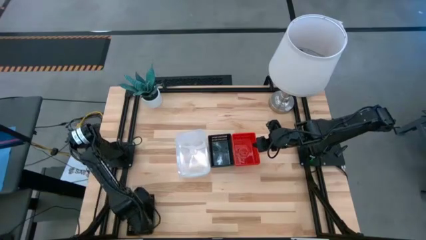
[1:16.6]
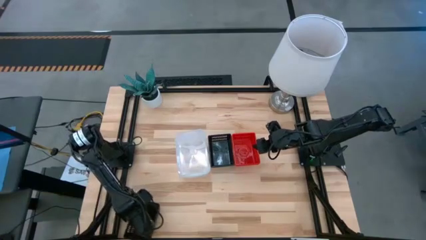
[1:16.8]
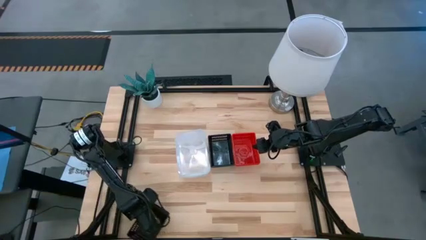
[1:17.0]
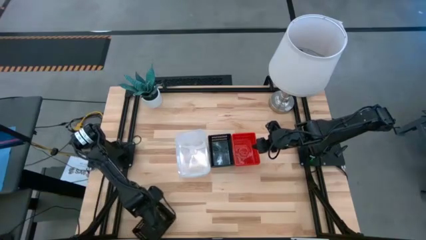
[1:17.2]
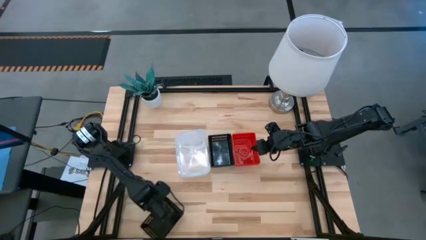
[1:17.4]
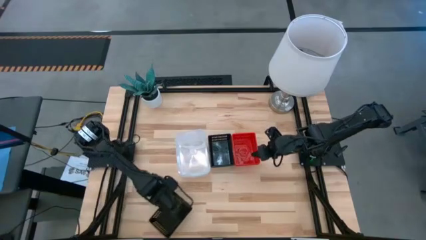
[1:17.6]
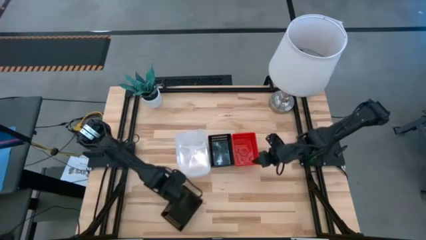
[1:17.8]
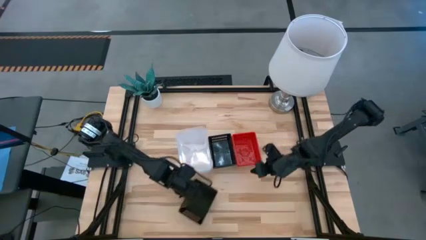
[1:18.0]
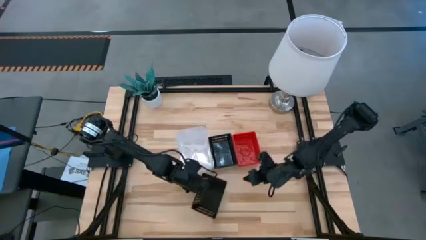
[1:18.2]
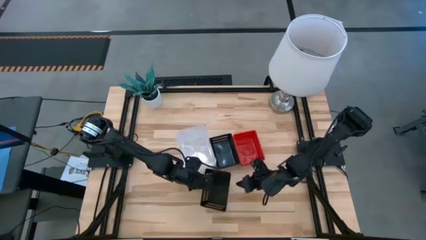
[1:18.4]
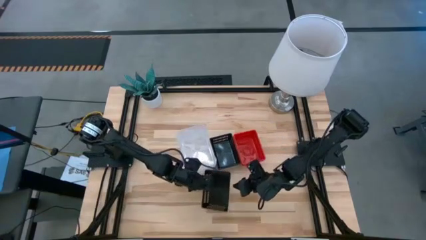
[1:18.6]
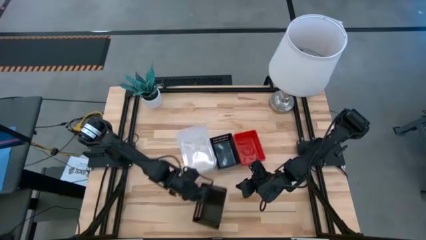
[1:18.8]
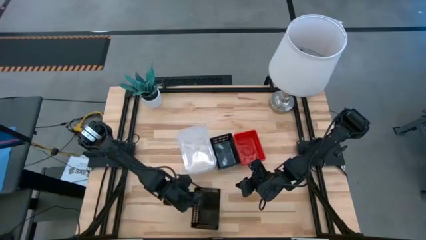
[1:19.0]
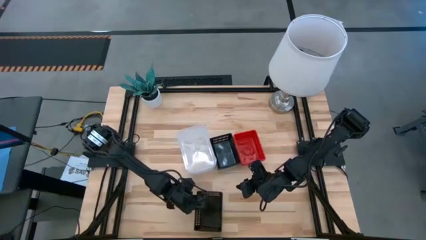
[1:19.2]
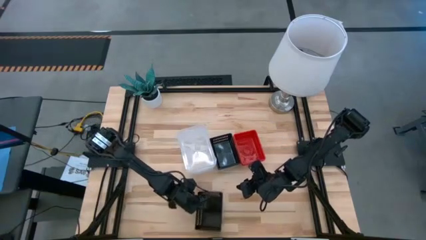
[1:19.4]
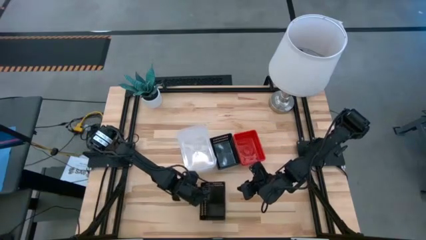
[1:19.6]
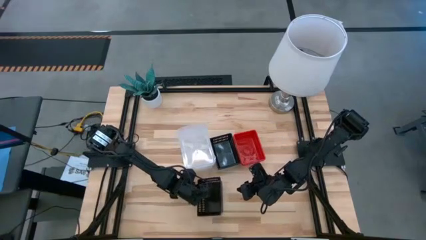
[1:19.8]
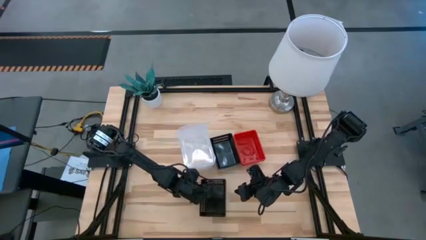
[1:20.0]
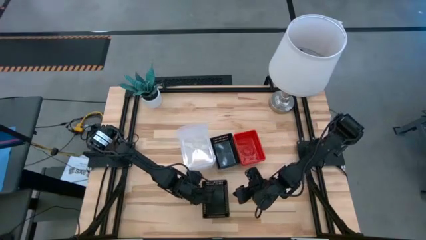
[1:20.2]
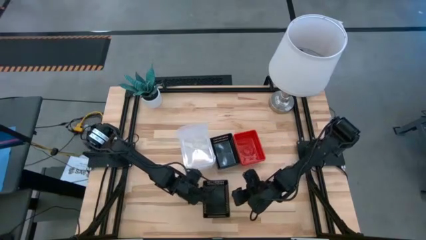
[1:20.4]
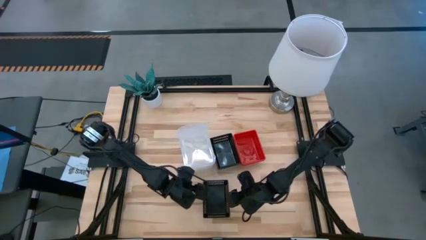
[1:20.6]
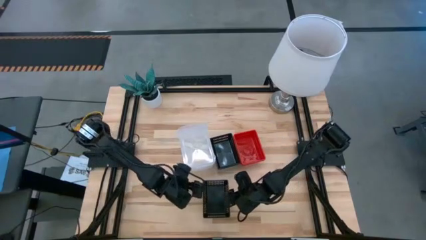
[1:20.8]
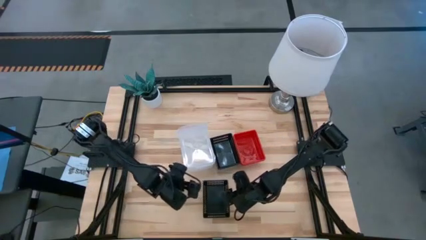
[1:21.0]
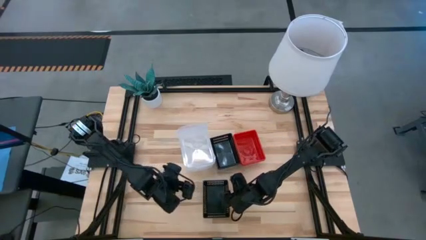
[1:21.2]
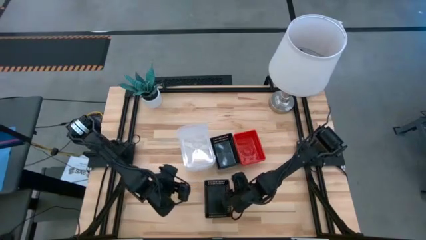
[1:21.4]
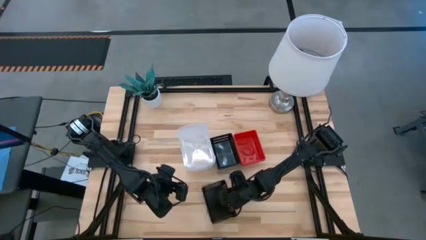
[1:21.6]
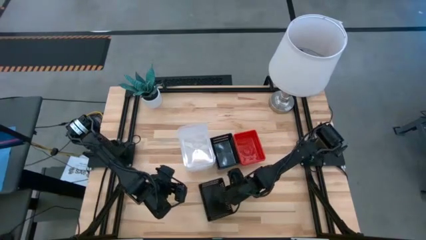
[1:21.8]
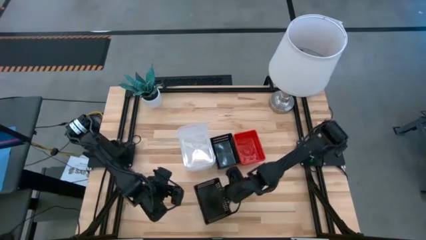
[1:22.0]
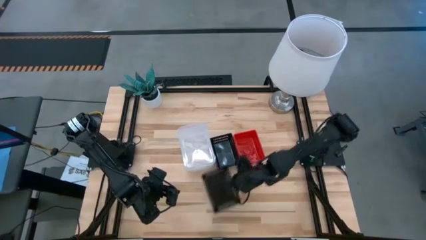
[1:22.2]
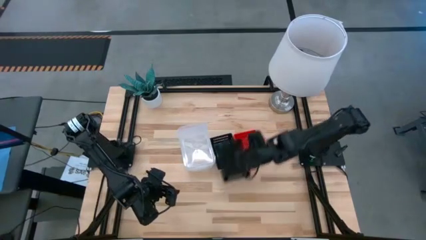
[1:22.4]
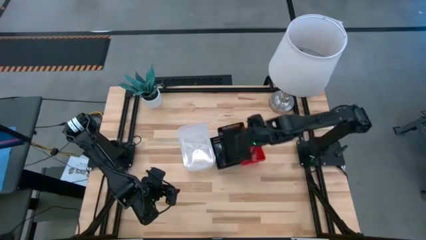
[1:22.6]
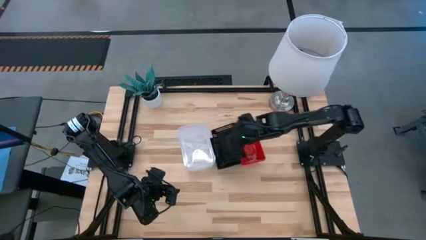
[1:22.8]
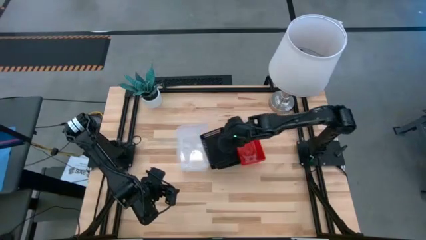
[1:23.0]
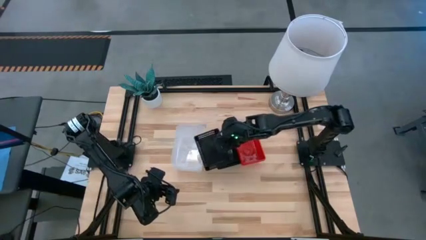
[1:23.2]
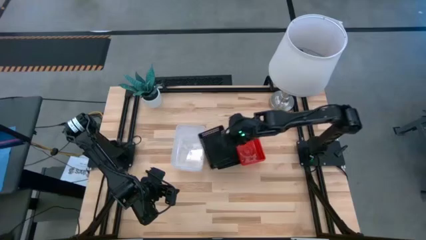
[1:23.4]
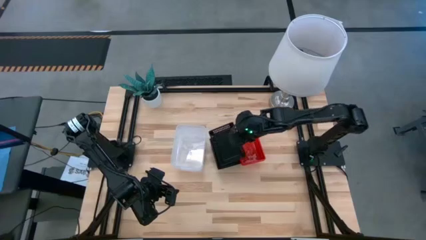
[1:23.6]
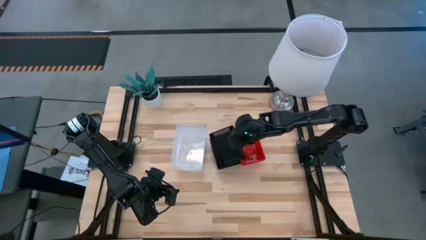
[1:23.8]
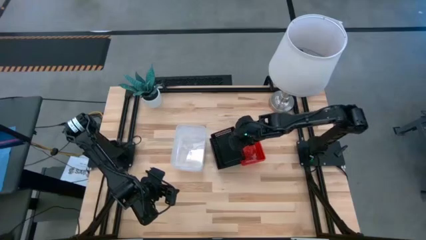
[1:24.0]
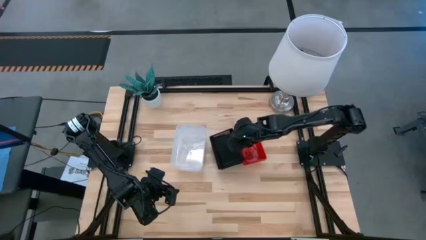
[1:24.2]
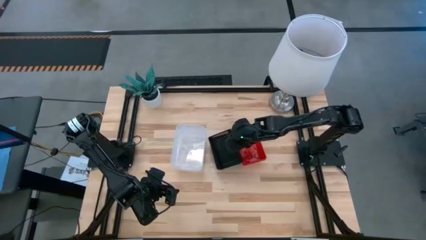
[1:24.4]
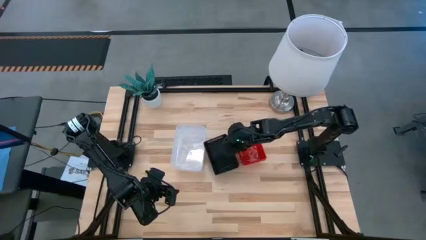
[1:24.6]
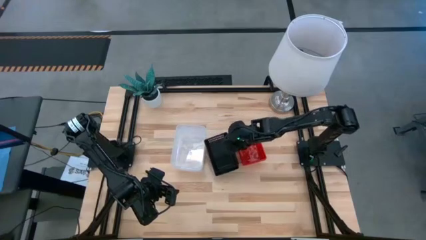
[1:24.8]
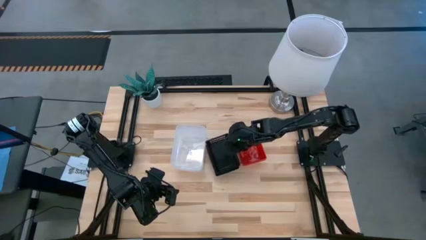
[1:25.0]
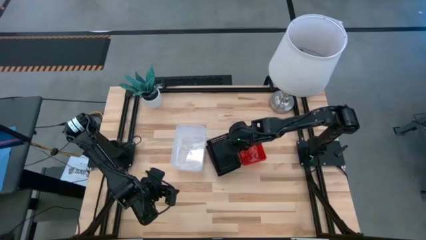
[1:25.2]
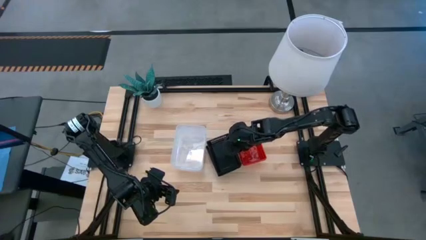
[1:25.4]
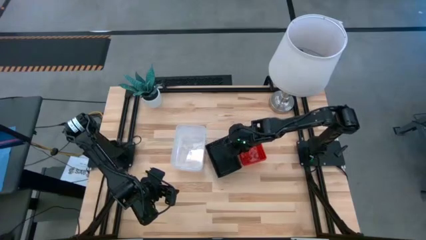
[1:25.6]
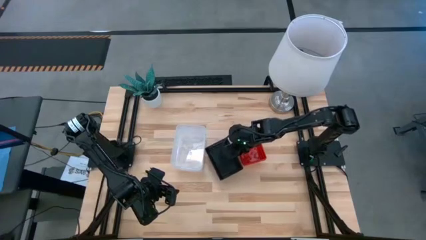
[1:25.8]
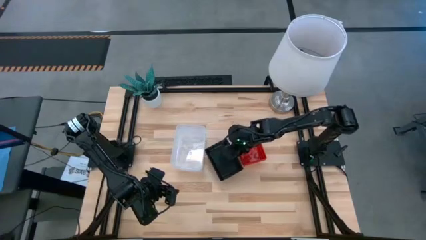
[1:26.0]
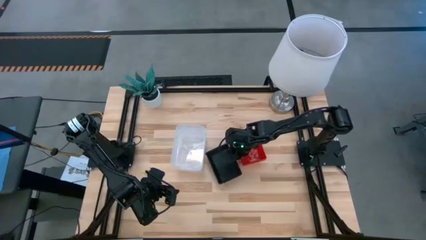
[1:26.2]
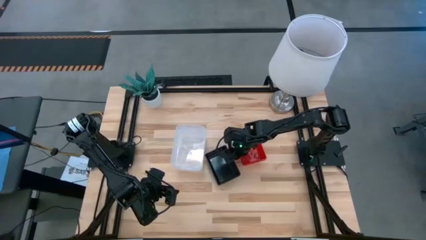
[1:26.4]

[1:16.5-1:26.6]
Stack the bottom black bin on the top black bin

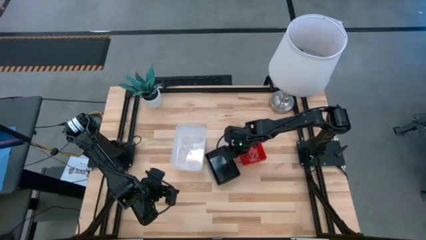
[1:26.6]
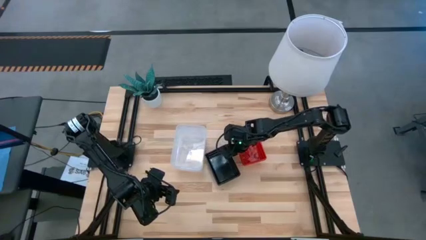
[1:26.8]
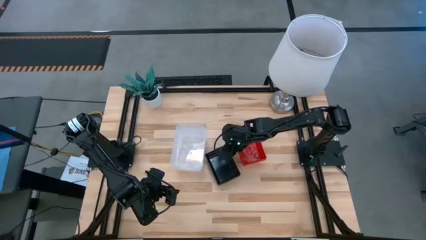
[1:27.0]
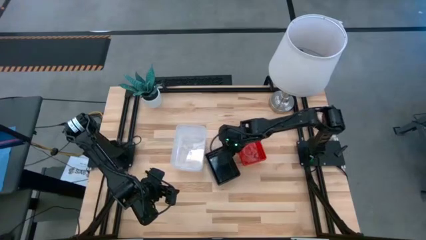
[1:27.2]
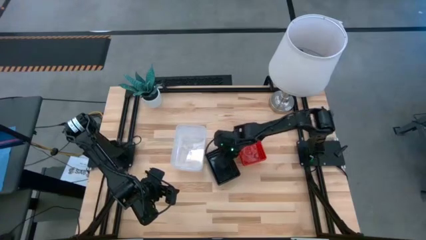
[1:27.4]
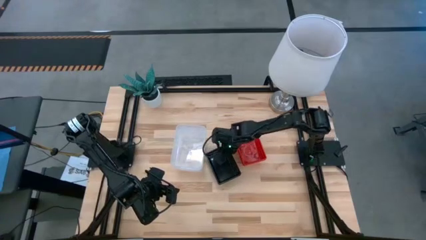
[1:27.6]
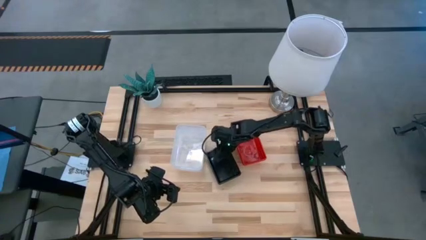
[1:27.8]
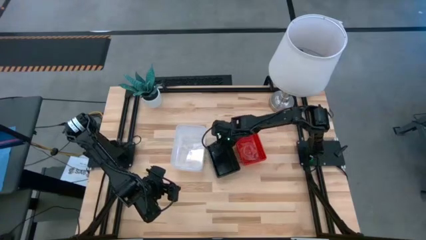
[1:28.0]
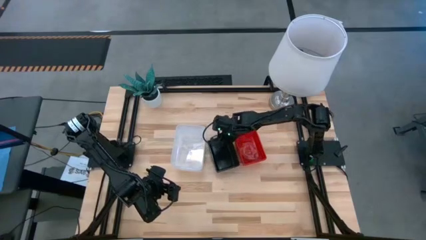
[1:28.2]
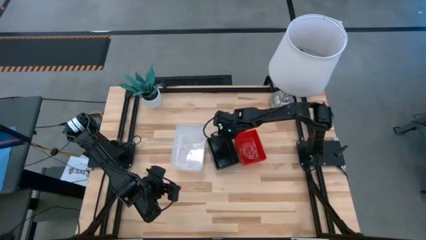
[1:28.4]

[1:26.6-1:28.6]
Adjust the stacked black bins

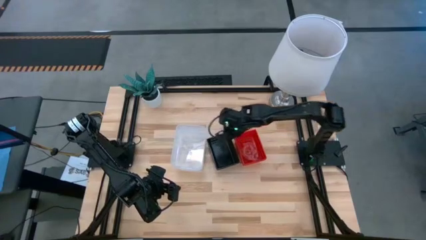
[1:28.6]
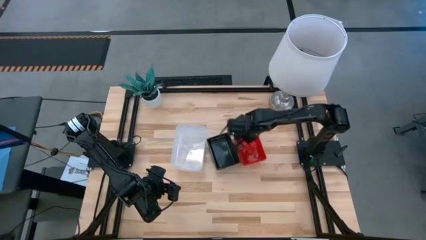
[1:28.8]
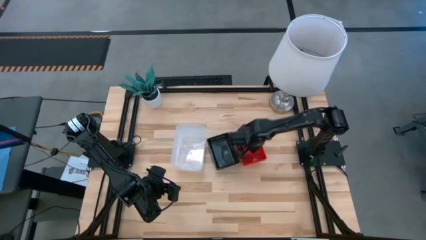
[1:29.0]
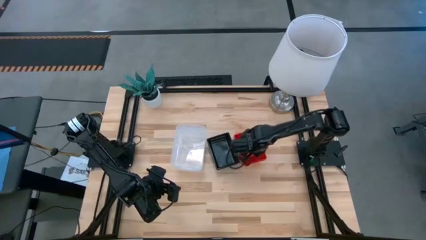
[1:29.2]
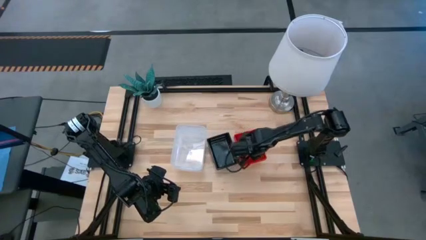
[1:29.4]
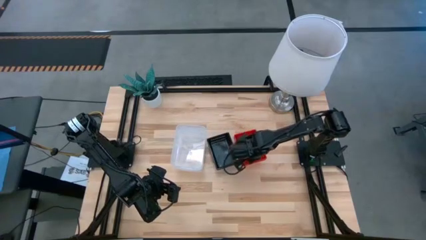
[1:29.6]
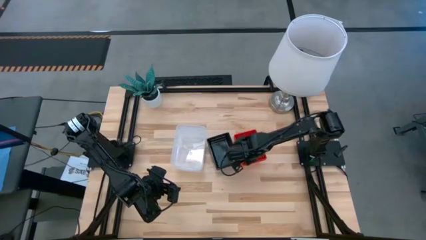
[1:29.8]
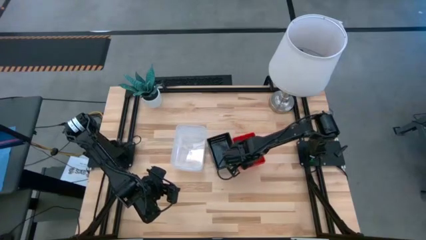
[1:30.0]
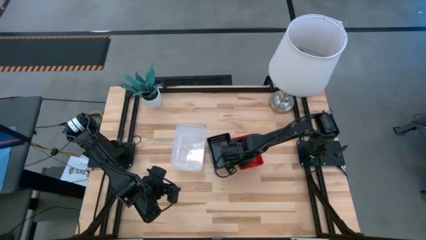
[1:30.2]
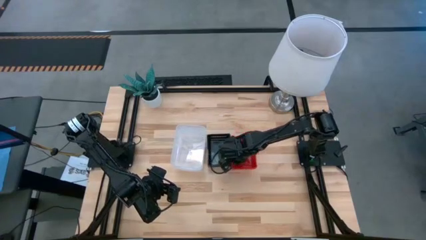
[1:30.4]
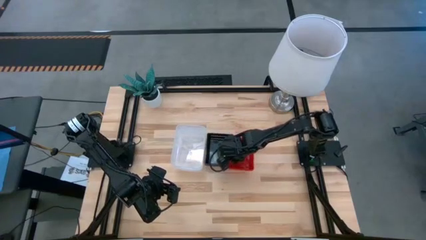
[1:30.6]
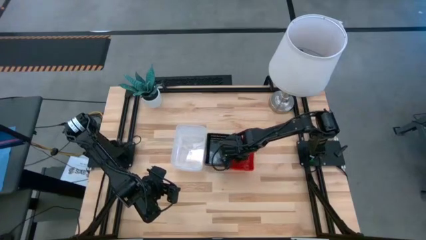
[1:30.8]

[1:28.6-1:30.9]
Adjust the stacked red bins
